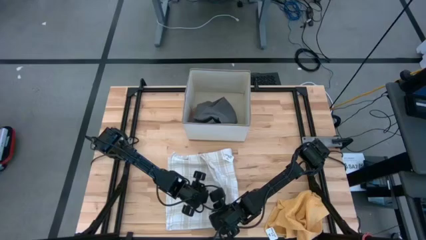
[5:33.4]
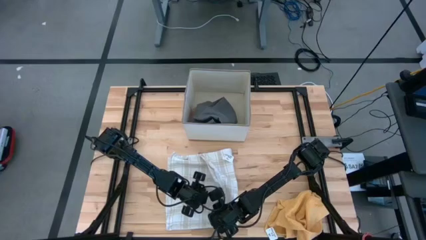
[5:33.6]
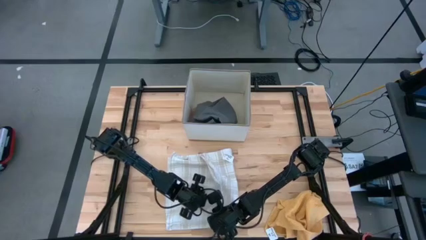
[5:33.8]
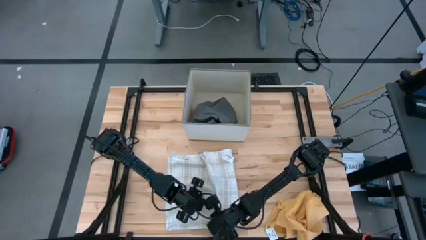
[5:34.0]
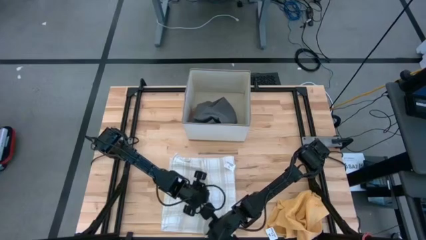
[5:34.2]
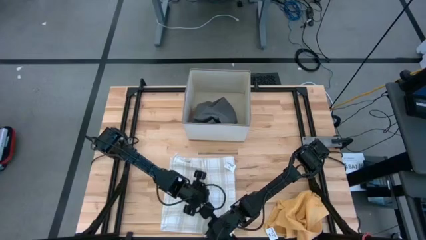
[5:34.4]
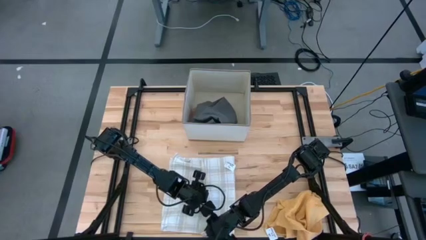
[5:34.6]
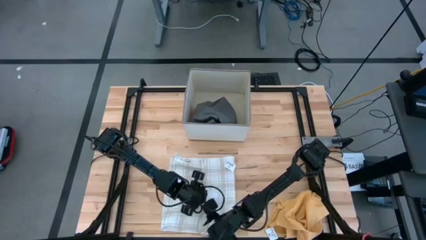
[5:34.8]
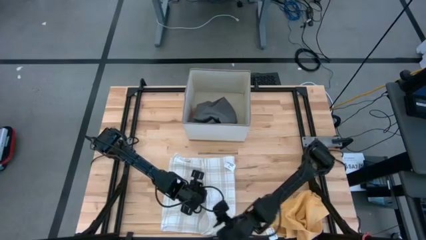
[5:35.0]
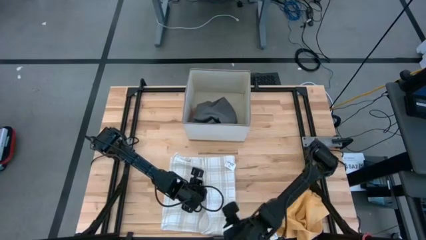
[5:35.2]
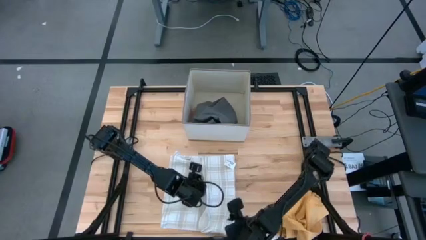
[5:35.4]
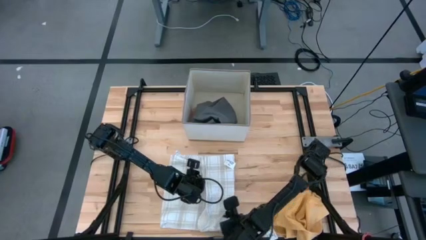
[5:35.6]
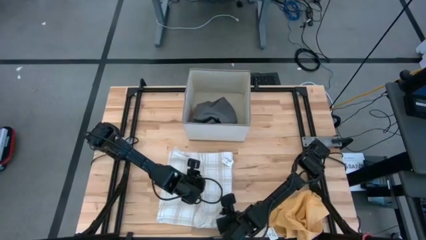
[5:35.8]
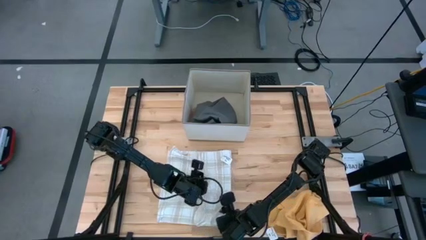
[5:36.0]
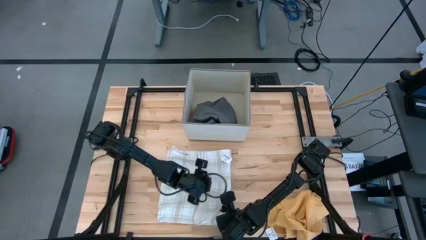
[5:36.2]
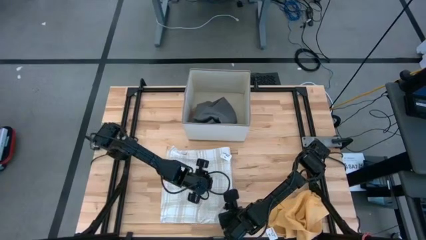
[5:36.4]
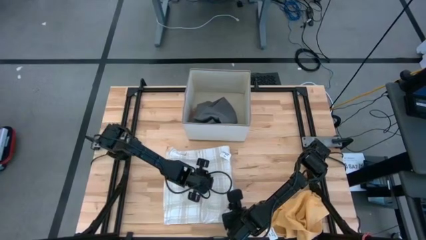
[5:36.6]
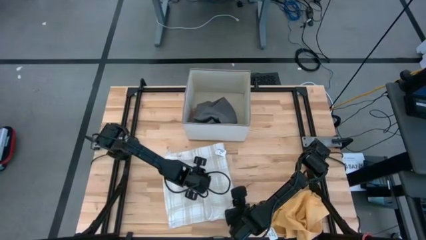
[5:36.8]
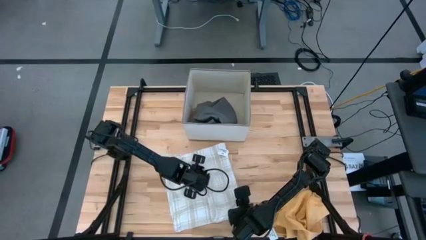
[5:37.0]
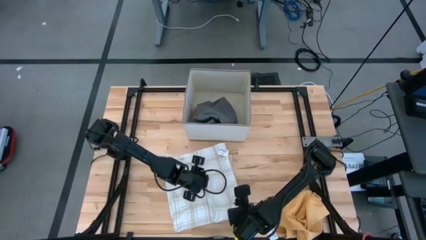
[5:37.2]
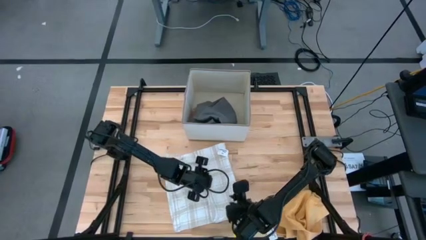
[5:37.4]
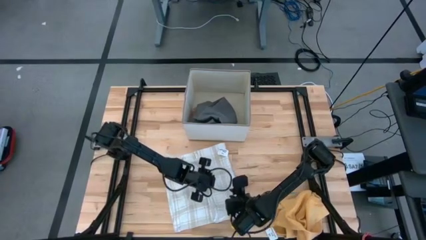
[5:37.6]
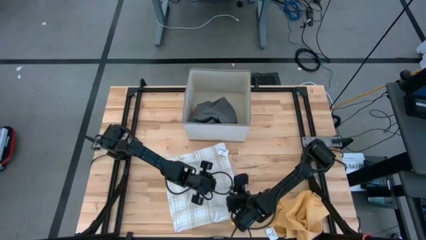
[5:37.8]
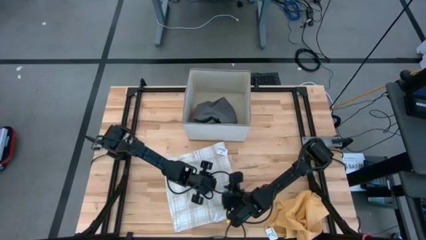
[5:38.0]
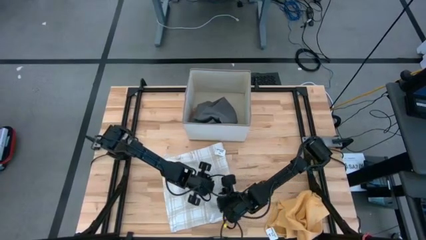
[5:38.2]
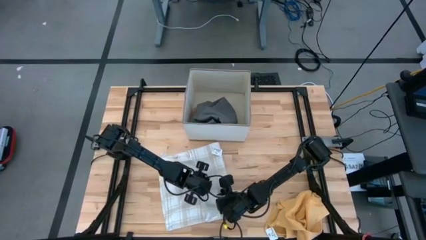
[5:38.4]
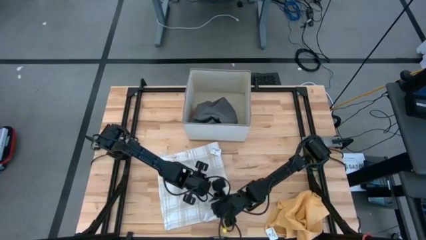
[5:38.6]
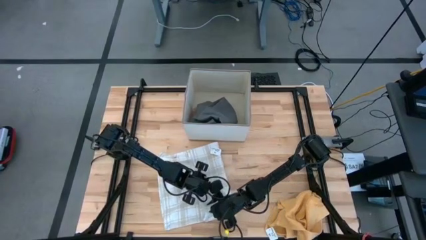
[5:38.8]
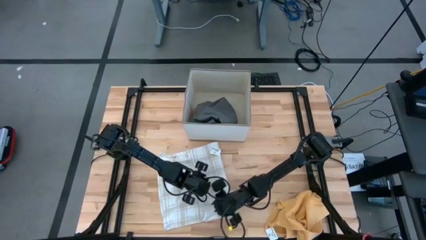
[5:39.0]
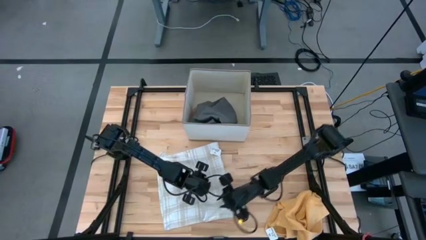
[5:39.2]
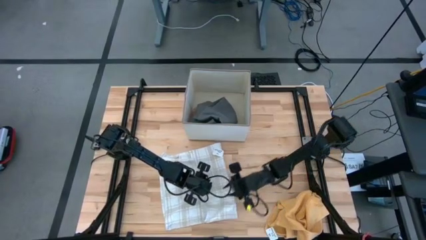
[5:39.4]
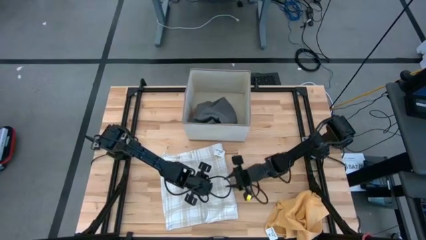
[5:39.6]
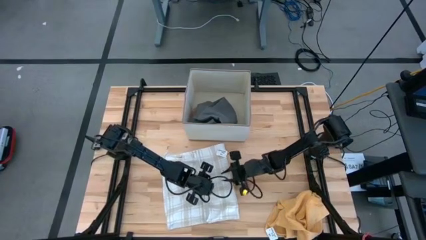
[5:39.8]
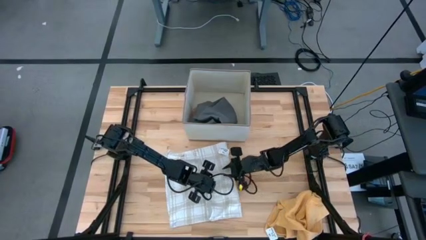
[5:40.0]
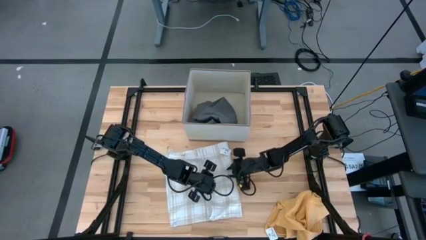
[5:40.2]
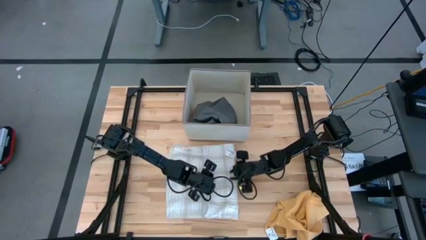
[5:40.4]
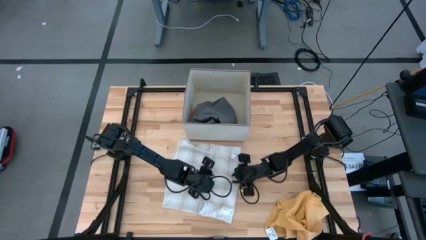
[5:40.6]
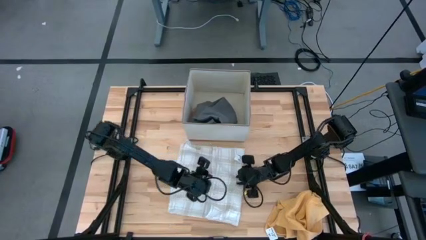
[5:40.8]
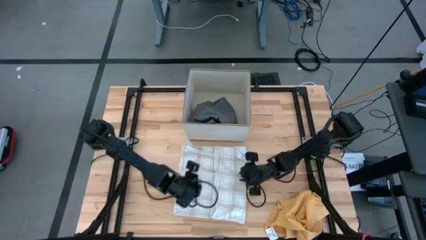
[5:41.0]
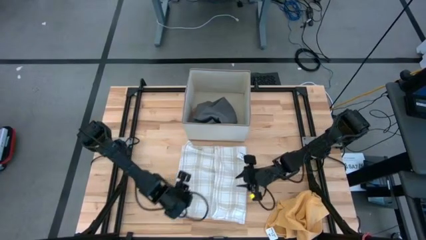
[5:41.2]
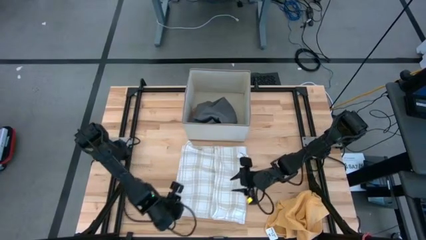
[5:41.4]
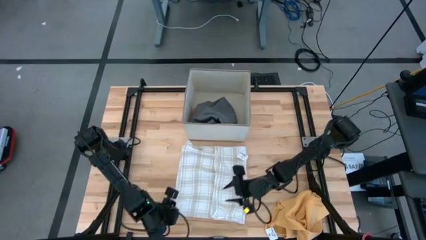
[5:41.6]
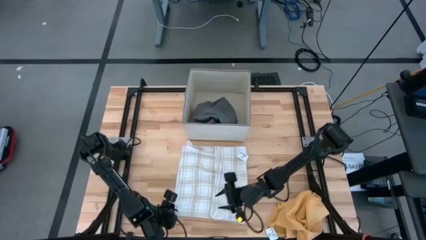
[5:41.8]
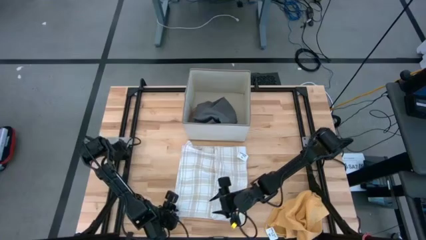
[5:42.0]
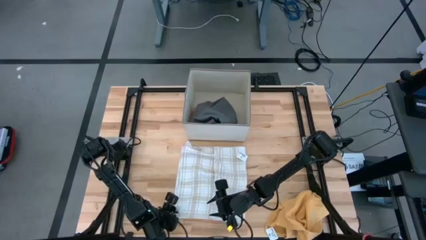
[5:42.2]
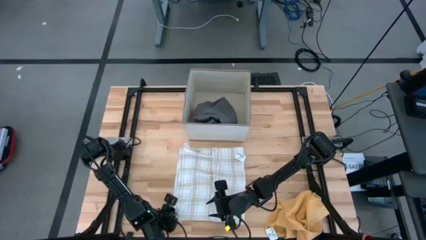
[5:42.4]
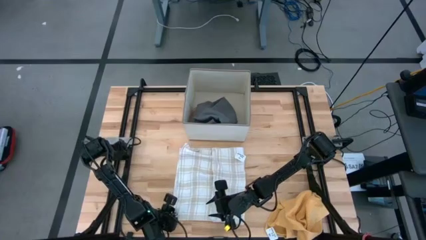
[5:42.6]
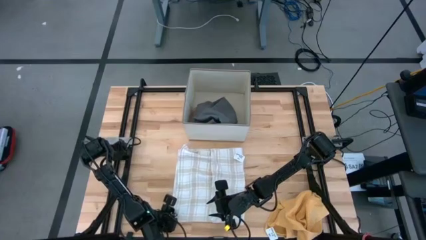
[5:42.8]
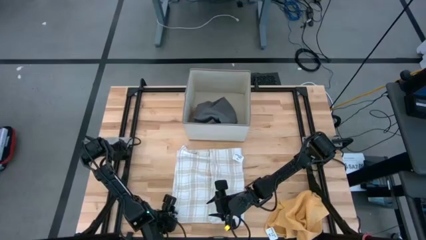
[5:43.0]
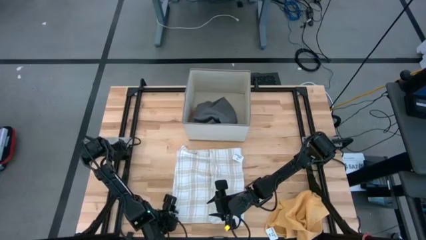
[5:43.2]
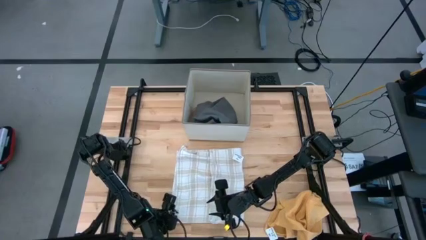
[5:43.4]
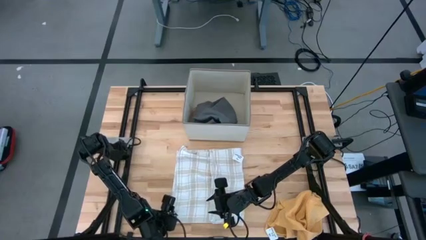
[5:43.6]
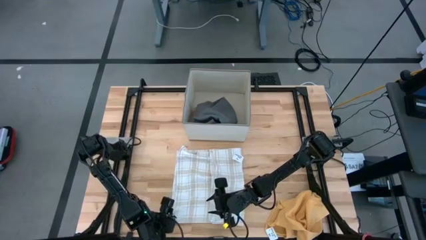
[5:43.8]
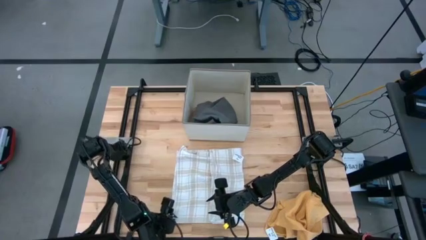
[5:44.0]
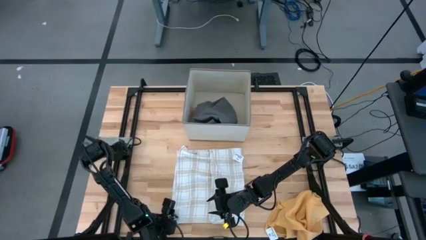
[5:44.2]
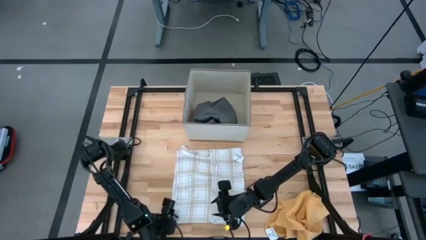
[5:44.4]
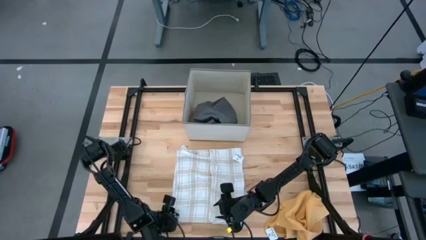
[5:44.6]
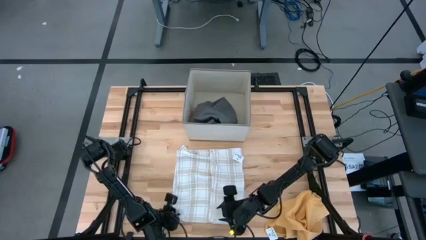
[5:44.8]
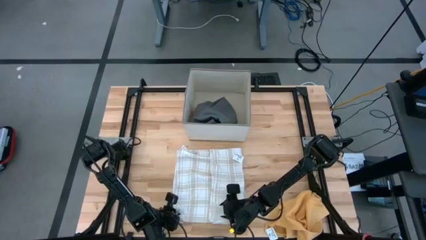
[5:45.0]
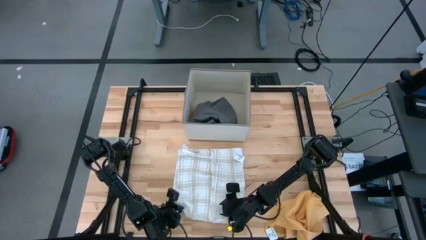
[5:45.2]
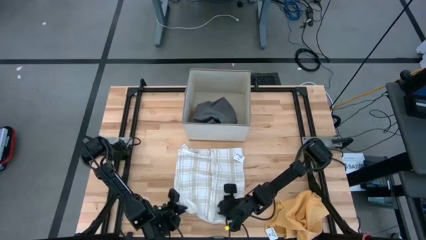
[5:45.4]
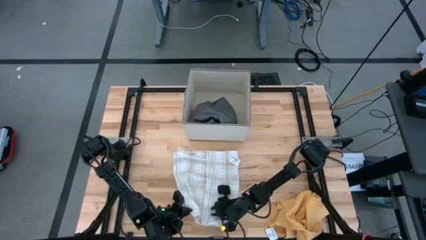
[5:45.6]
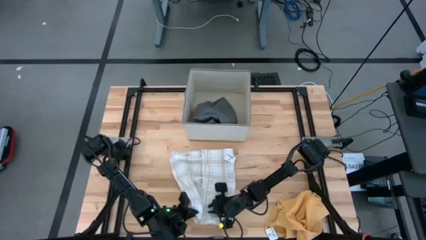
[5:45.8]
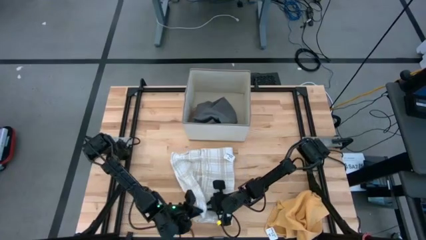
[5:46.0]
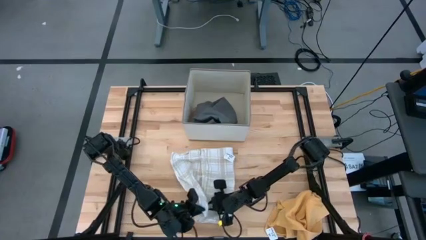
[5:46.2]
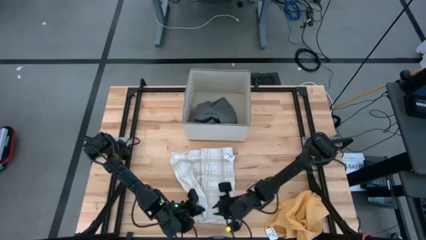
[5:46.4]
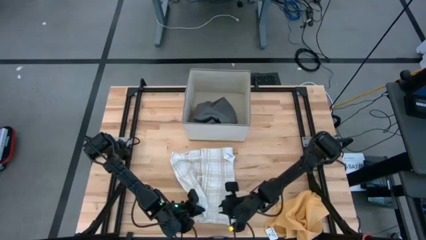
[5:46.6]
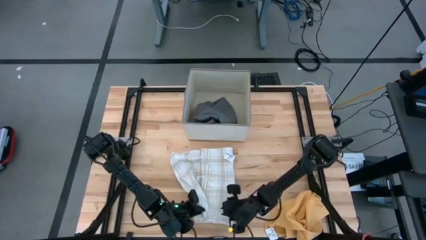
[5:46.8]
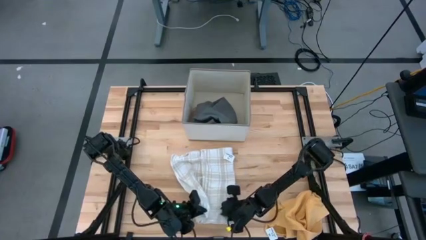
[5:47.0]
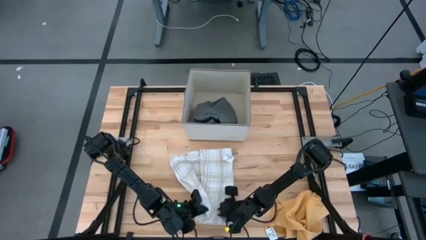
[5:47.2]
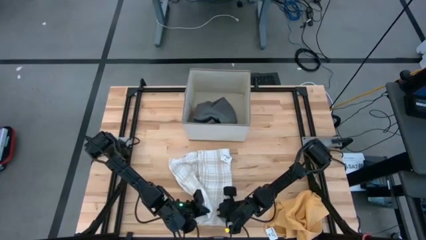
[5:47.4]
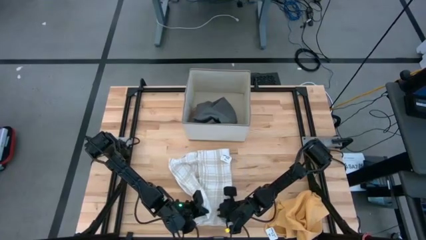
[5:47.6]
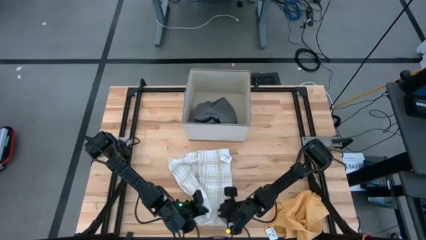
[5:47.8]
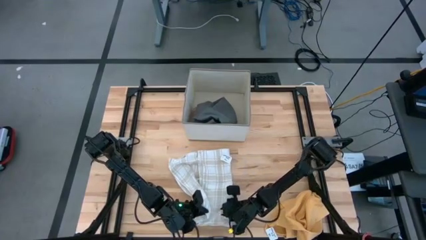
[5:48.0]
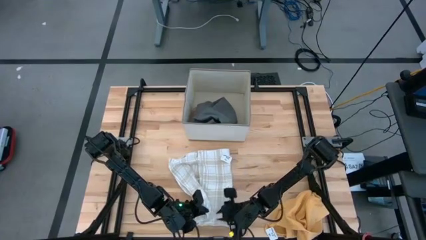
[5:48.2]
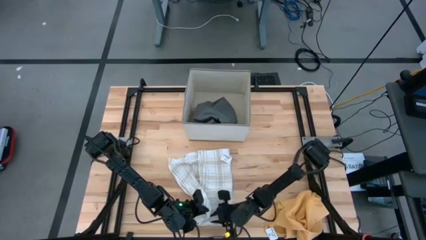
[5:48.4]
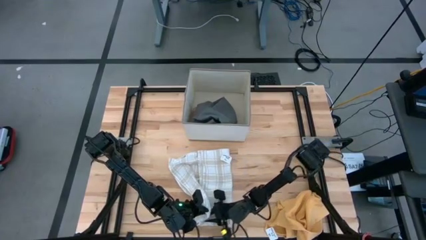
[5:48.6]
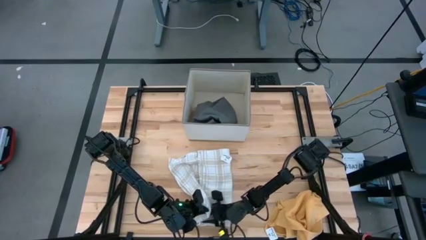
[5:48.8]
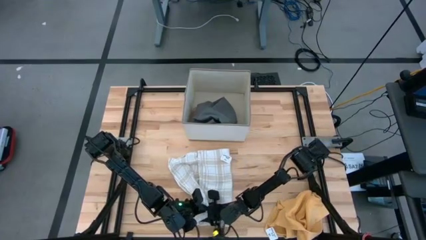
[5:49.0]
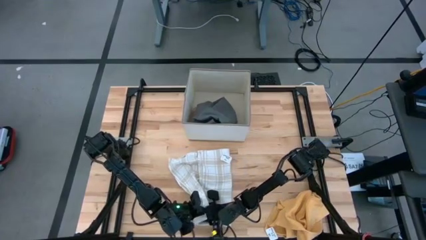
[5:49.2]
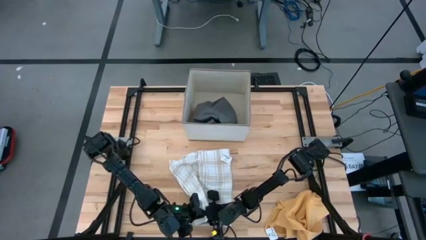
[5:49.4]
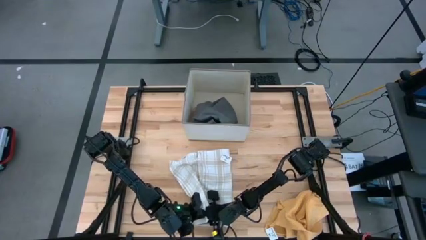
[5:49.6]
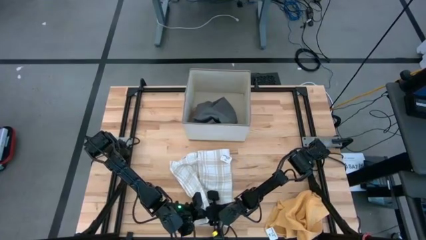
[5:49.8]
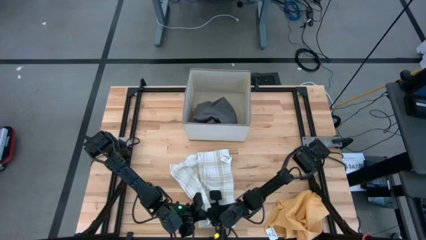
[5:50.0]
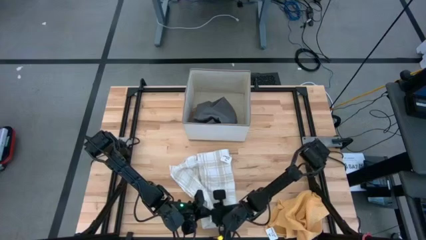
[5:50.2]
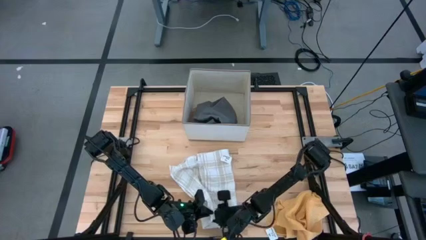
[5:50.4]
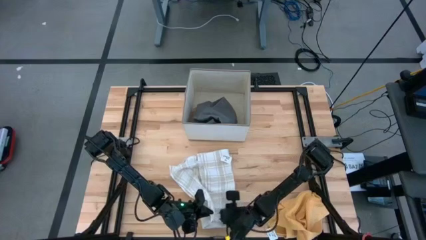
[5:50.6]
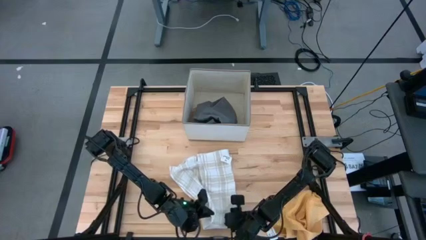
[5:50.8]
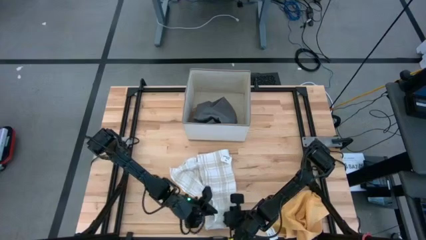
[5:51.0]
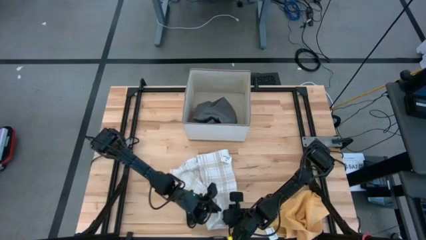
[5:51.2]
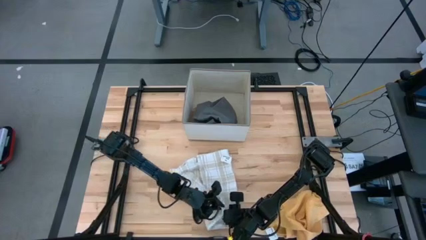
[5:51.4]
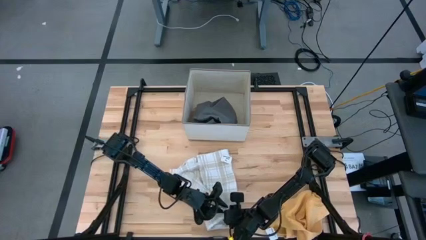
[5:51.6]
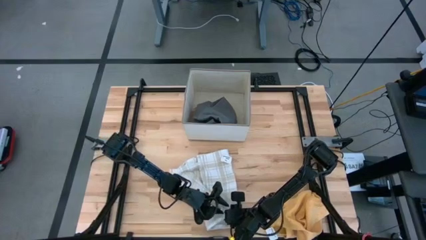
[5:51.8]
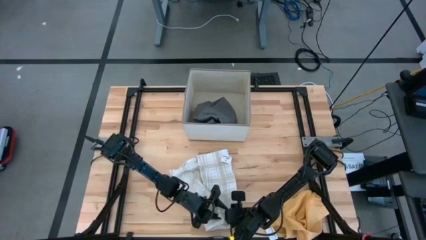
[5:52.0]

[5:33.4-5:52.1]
Task: Fold towel
Fold the white patterned towel
